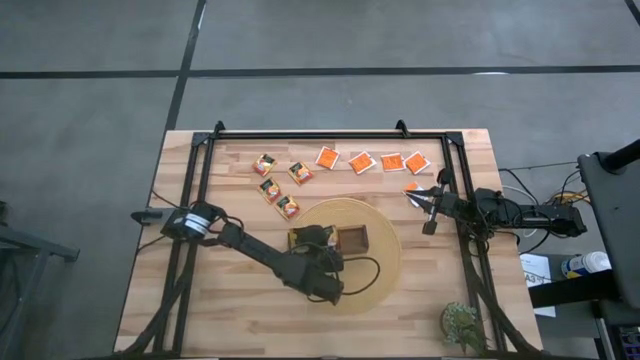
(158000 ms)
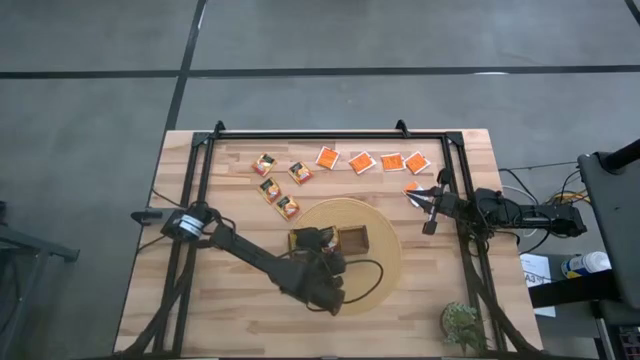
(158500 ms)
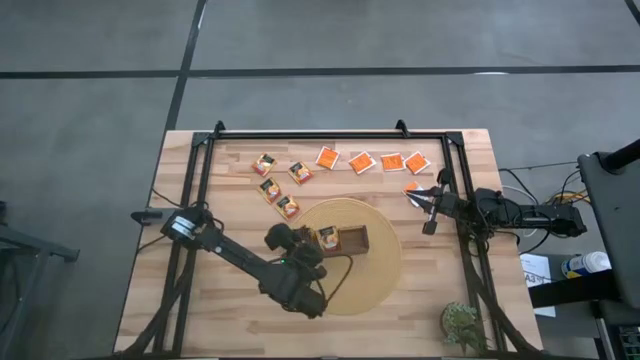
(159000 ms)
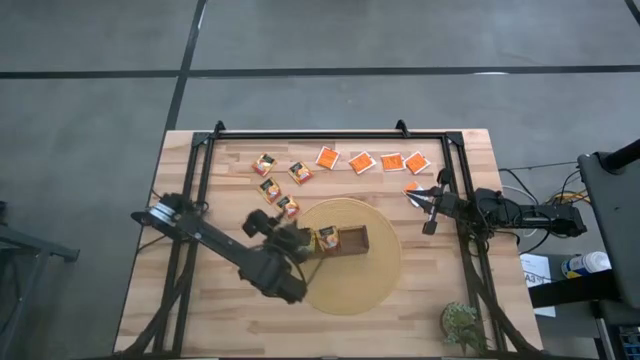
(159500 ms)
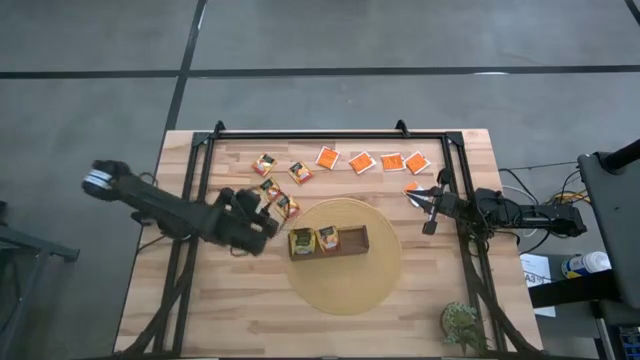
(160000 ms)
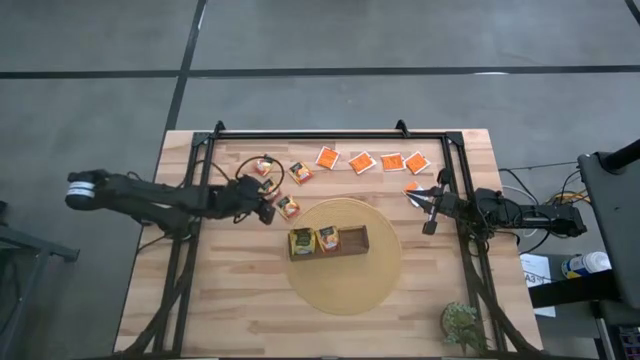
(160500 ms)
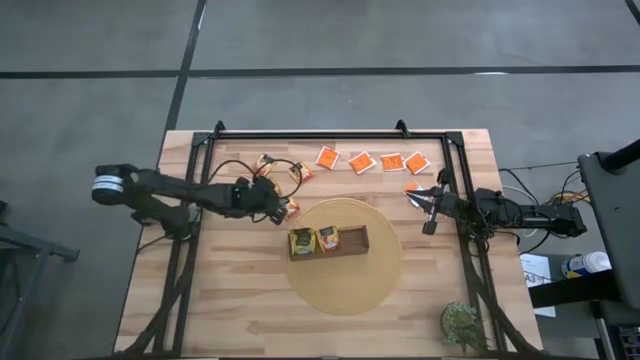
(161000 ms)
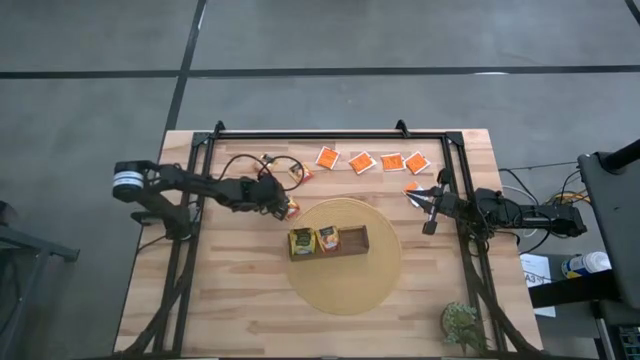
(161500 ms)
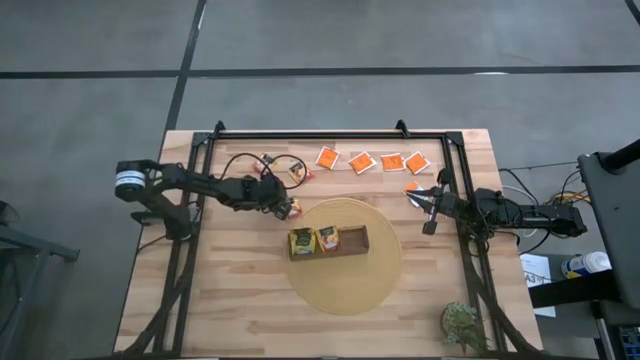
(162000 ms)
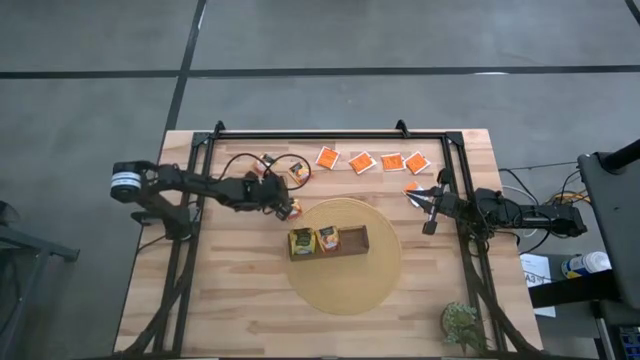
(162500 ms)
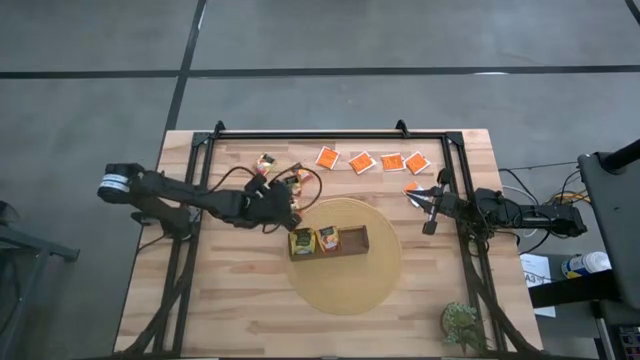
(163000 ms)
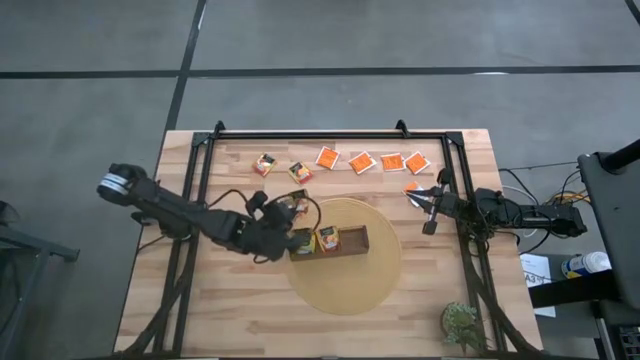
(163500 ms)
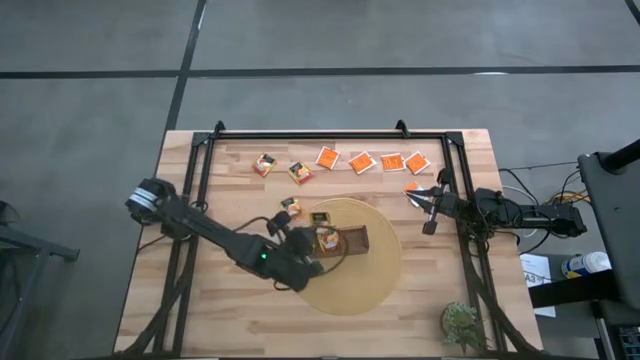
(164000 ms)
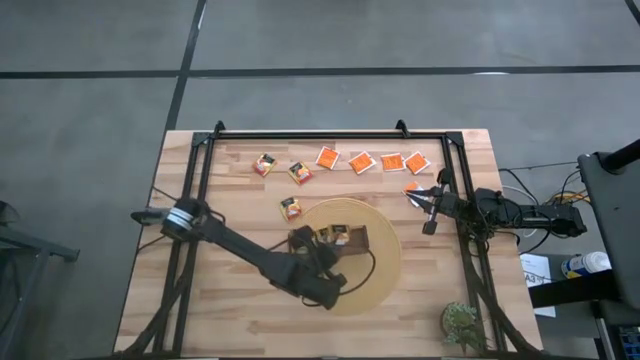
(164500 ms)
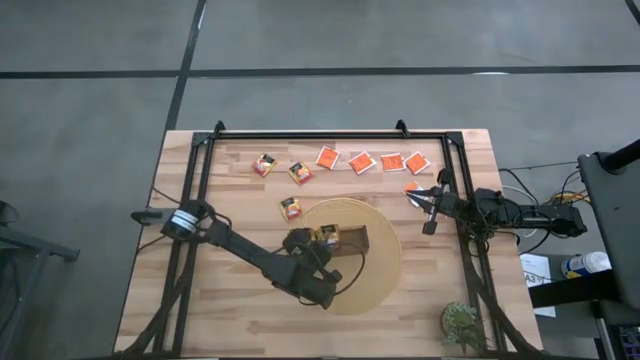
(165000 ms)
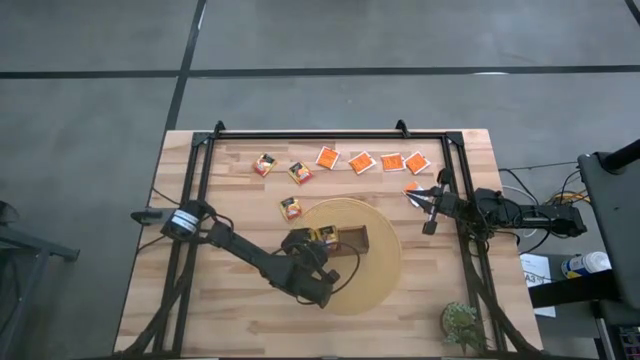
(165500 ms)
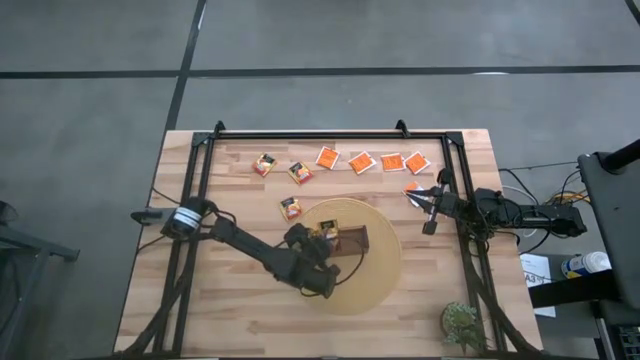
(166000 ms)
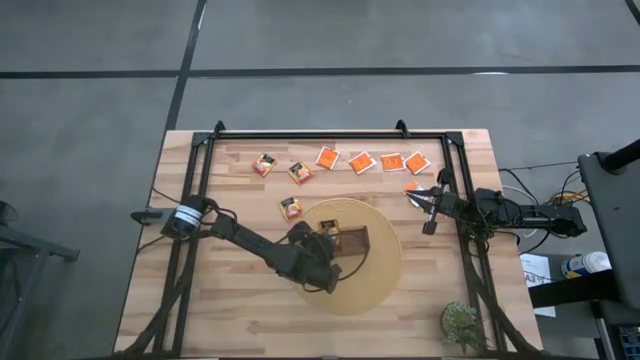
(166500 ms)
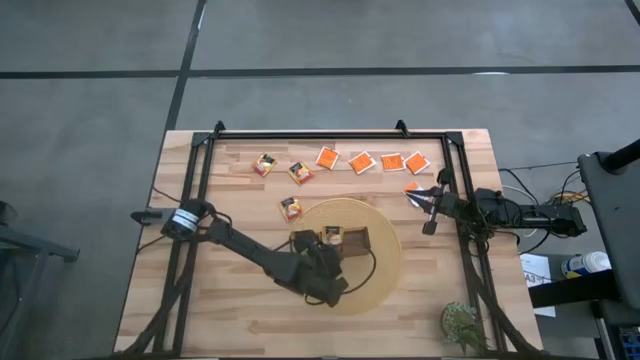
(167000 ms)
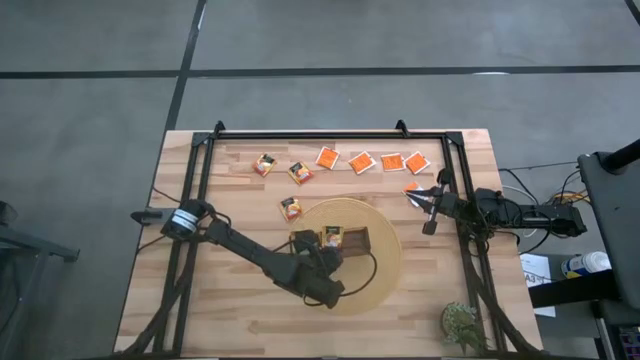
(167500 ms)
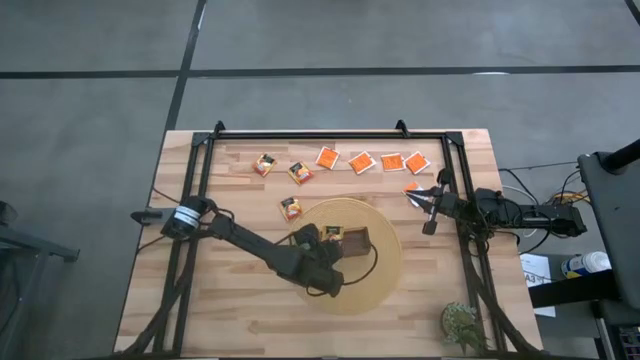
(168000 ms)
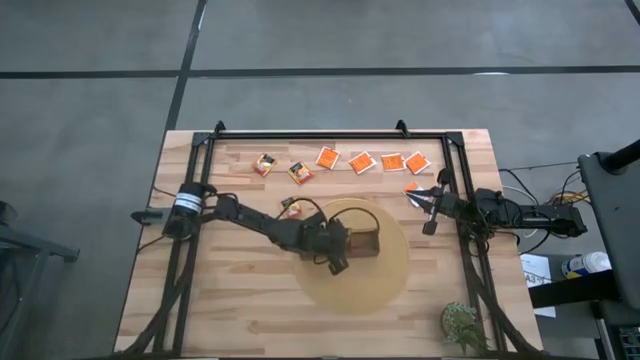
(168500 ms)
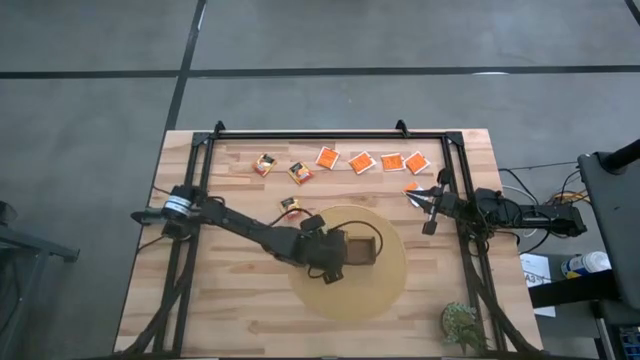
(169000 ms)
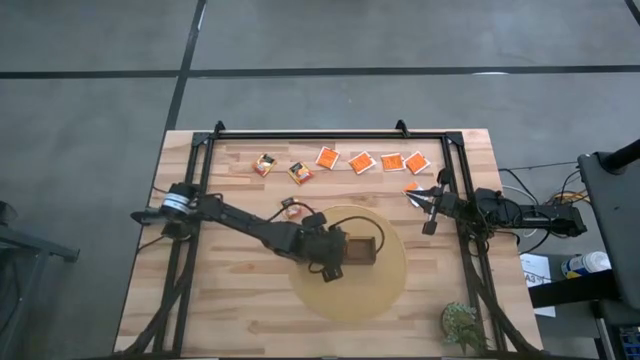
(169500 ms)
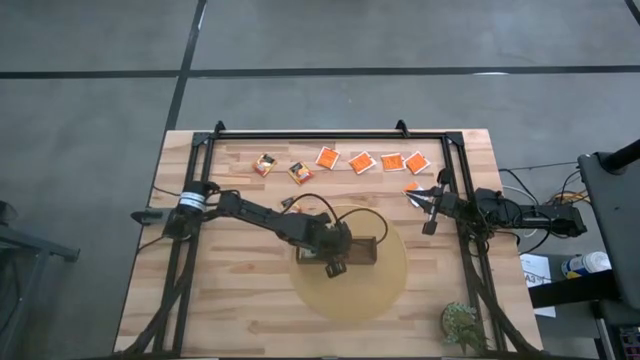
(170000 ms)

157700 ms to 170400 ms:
Task: Pick & Place Tea
Put the yellow tea bag into the middle section of the wooden organizer

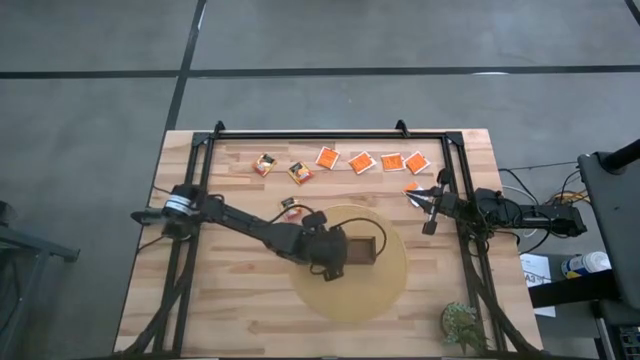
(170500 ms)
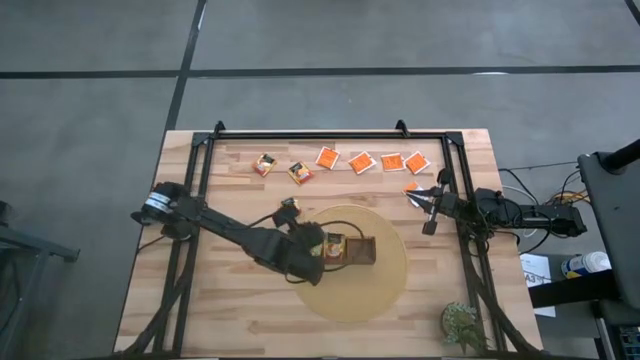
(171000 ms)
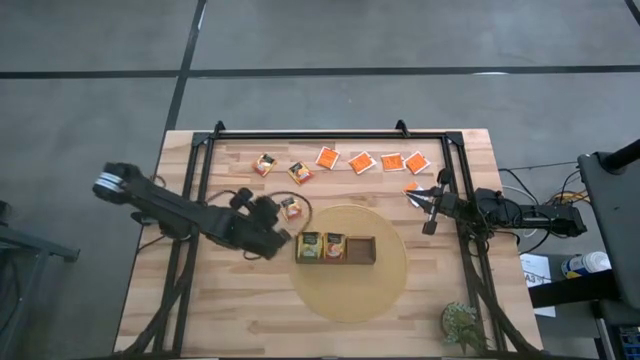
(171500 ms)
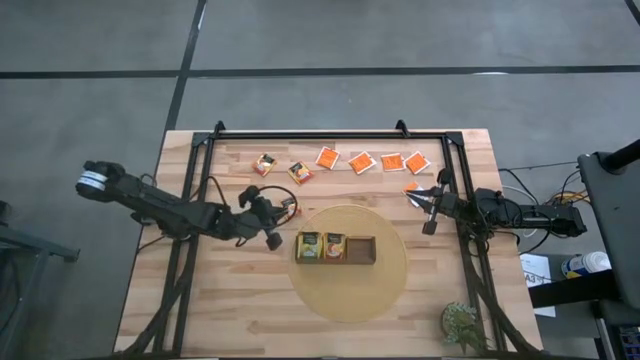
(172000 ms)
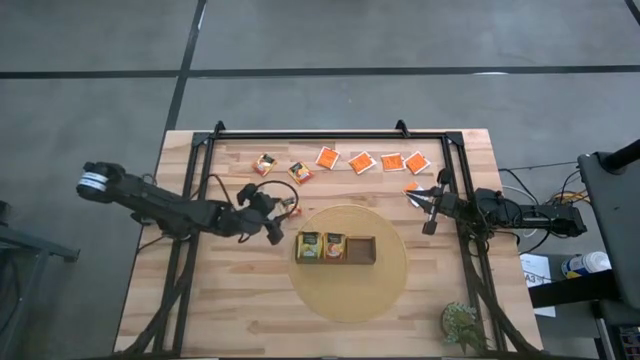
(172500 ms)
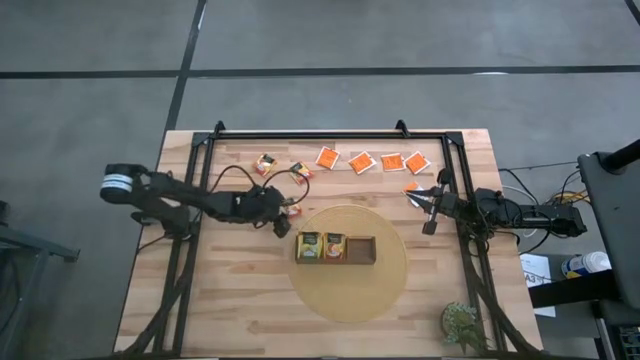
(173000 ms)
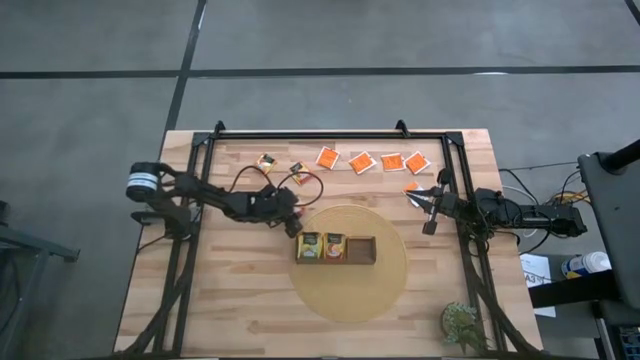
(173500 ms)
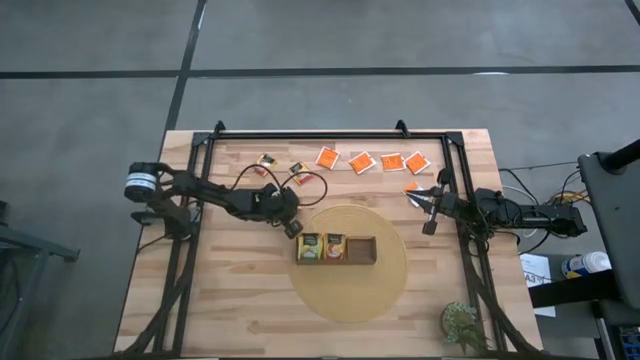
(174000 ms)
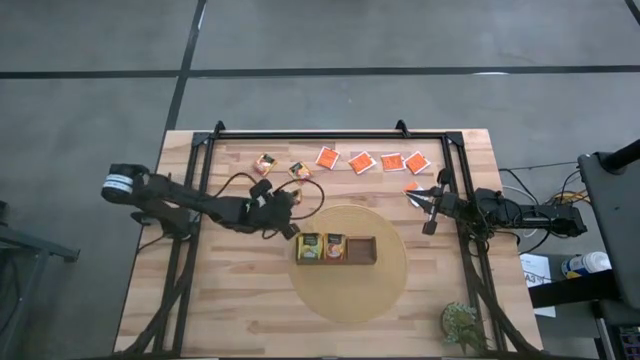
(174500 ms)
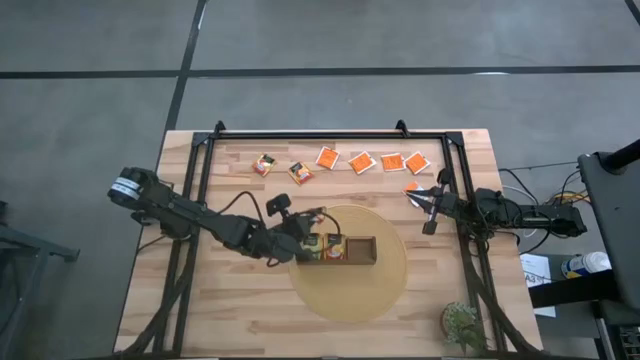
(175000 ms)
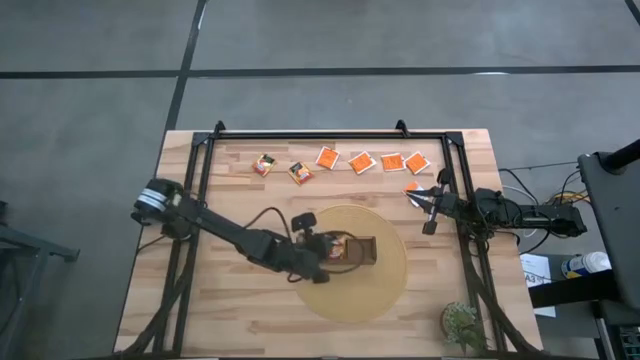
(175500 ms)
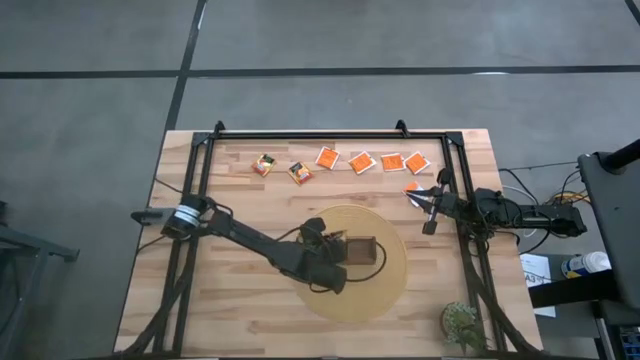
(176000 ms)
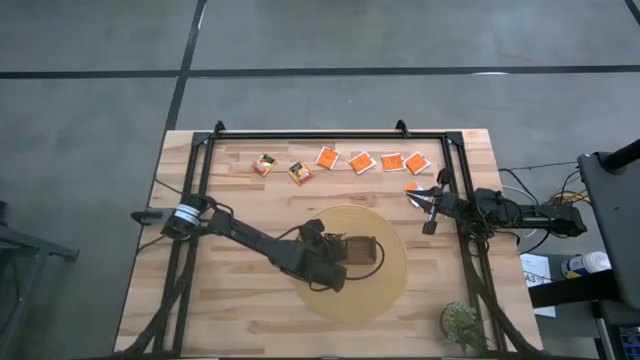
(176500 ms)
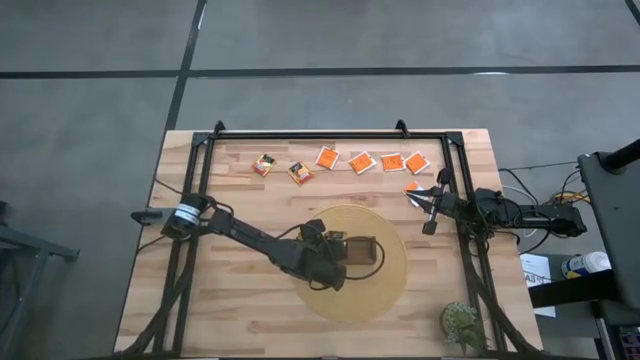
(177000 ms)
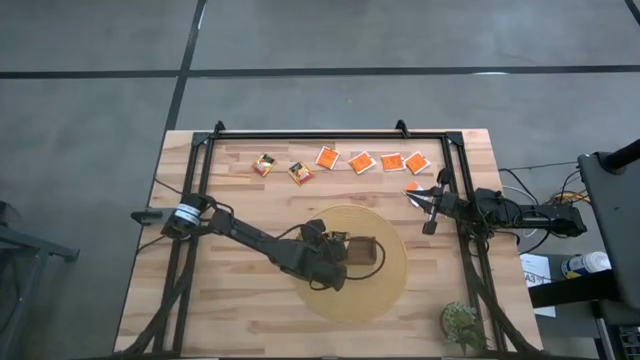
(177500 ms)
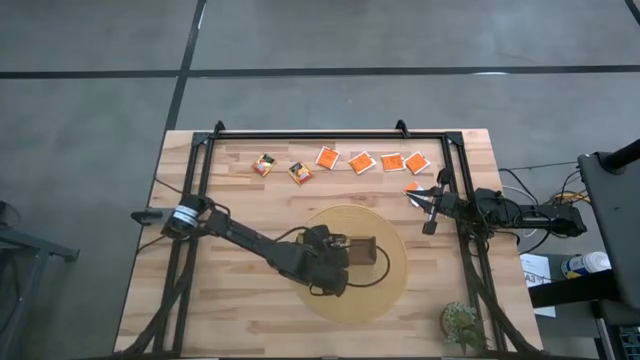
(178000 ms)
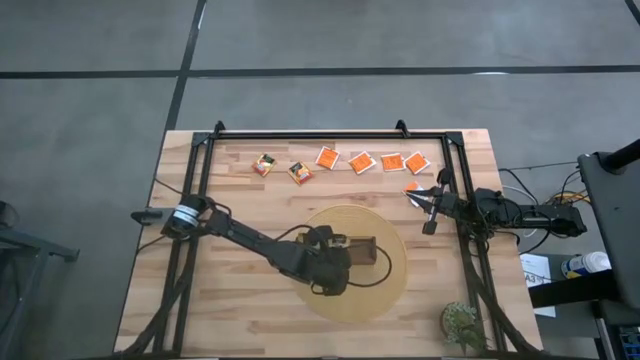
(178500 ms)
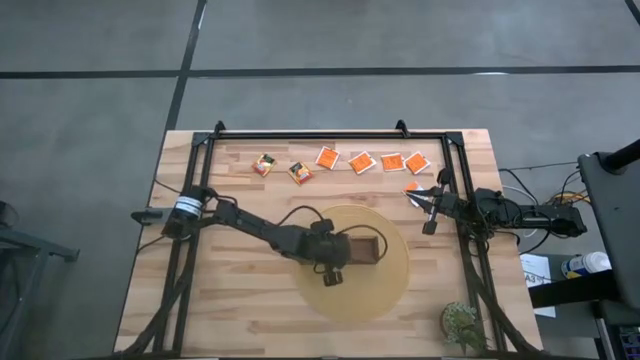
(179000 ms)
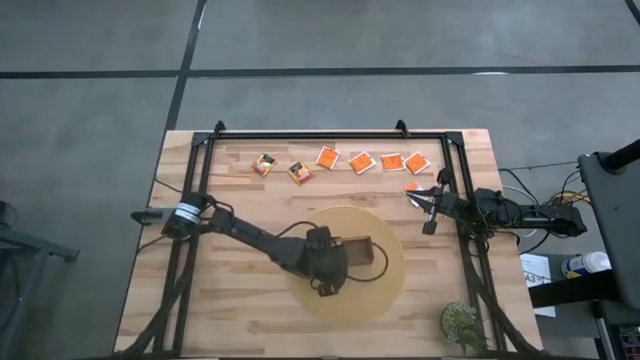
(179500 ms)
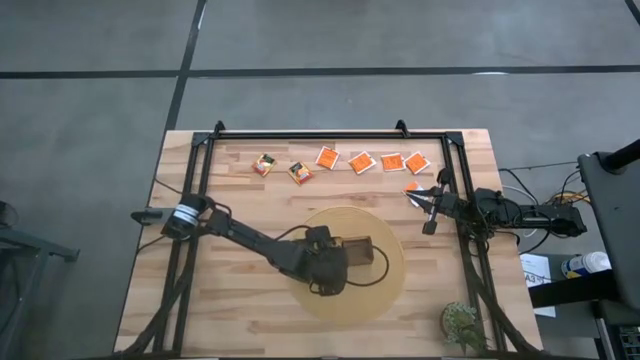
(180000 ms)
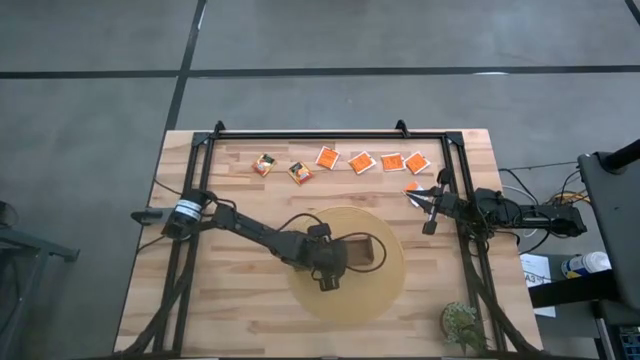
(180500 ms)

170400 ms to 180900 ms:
Put the yellow tea bag into the middle section of the wooden organizer
